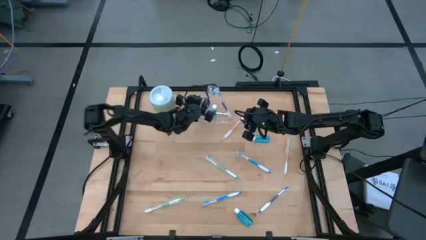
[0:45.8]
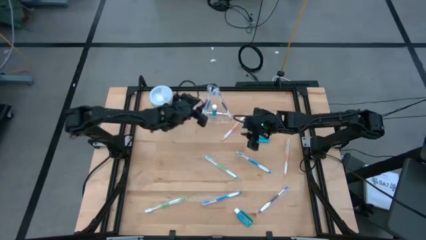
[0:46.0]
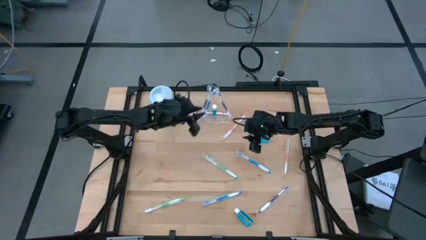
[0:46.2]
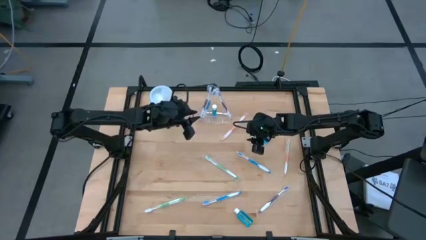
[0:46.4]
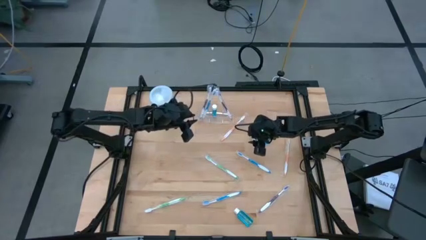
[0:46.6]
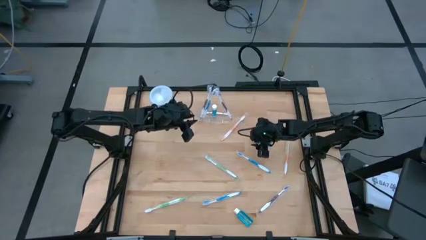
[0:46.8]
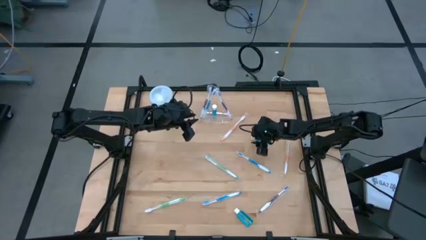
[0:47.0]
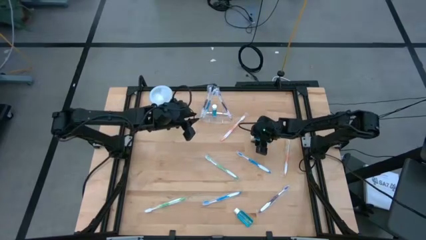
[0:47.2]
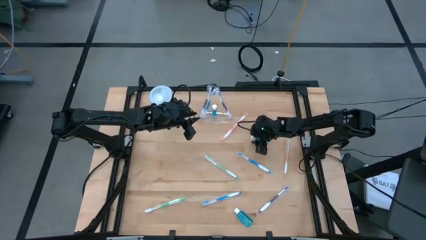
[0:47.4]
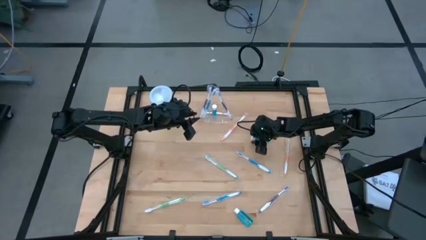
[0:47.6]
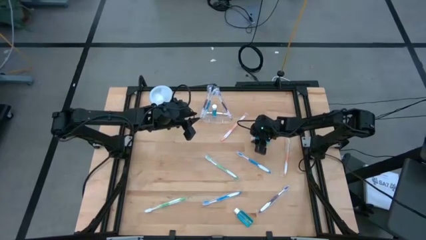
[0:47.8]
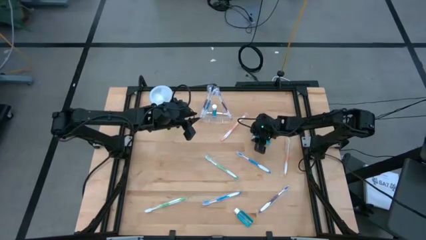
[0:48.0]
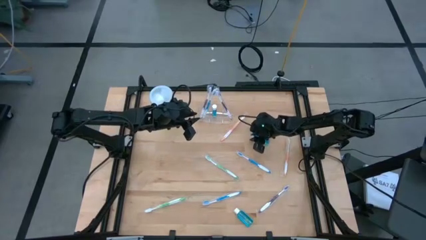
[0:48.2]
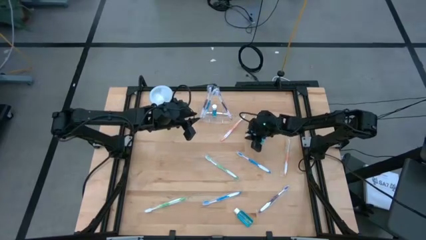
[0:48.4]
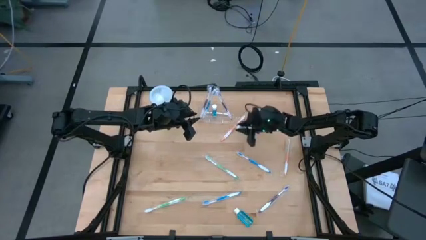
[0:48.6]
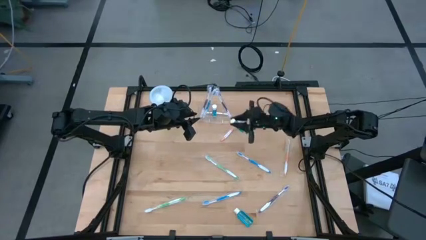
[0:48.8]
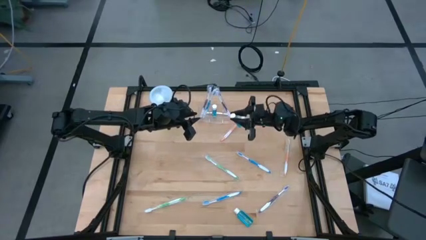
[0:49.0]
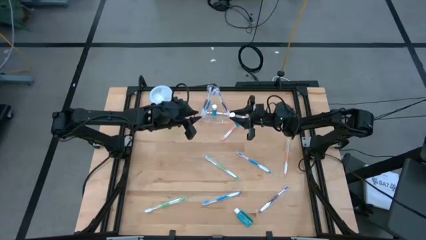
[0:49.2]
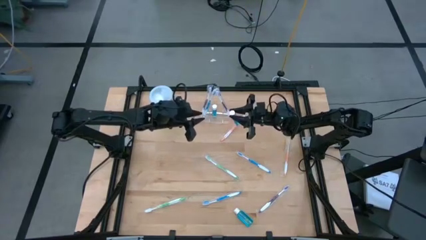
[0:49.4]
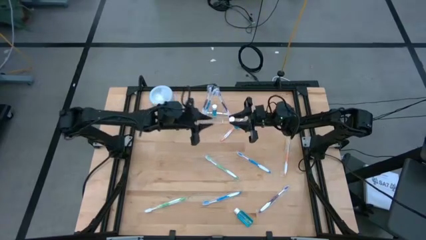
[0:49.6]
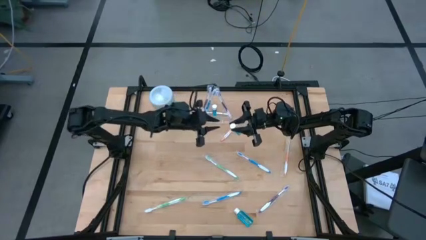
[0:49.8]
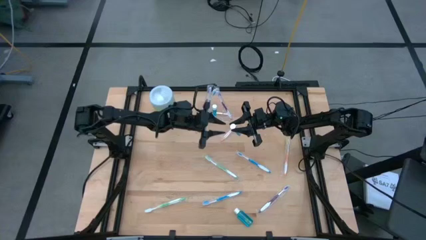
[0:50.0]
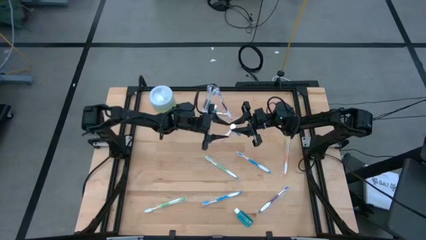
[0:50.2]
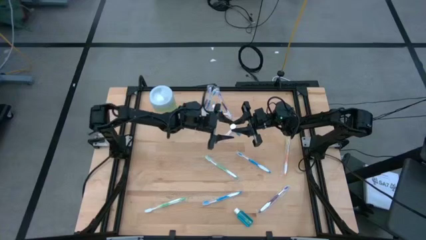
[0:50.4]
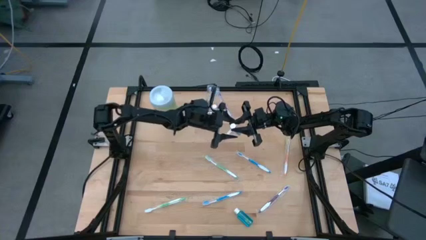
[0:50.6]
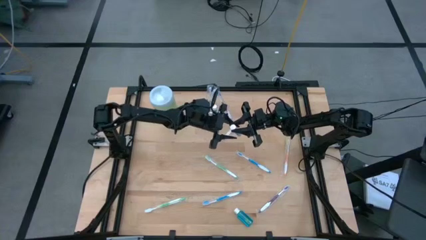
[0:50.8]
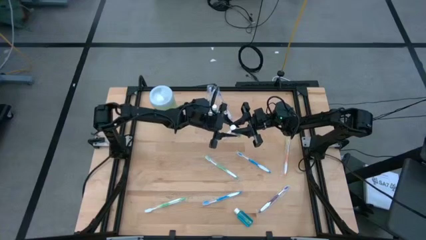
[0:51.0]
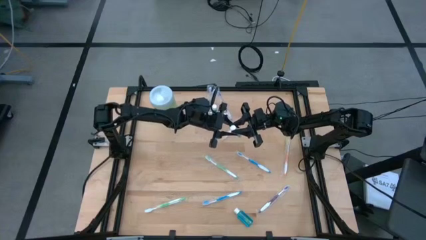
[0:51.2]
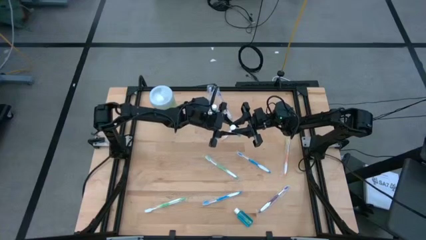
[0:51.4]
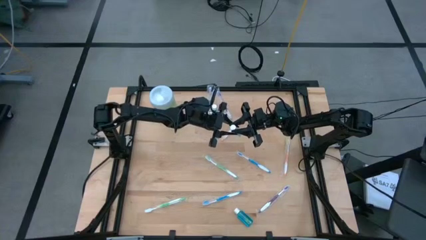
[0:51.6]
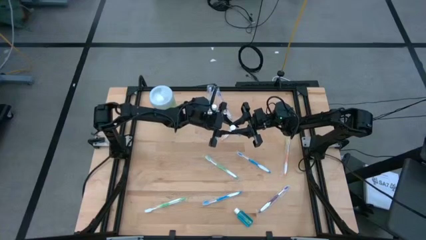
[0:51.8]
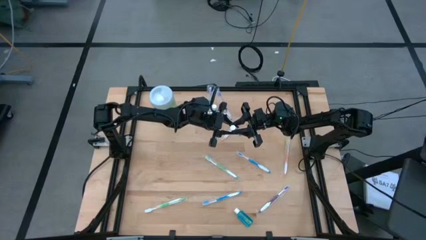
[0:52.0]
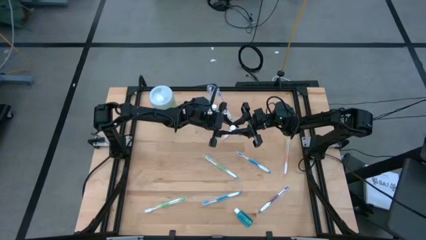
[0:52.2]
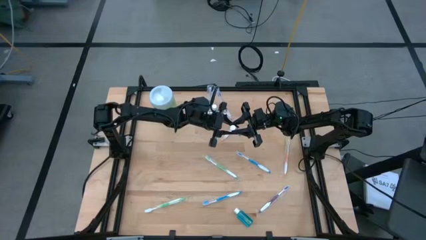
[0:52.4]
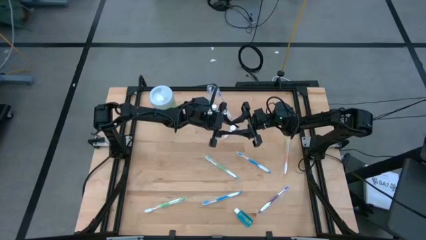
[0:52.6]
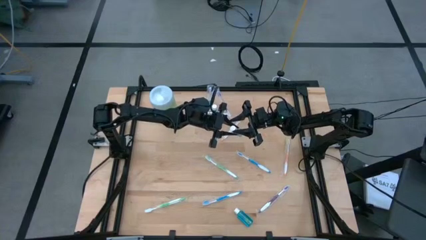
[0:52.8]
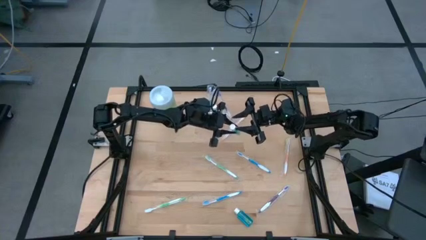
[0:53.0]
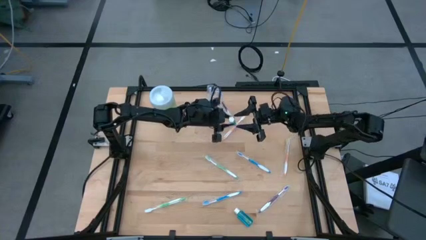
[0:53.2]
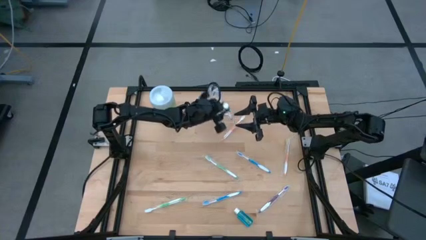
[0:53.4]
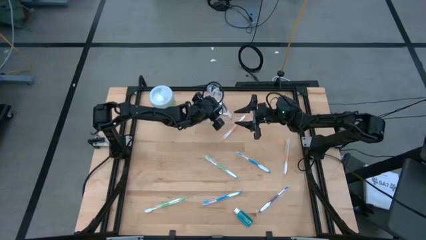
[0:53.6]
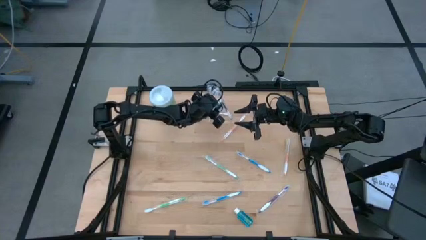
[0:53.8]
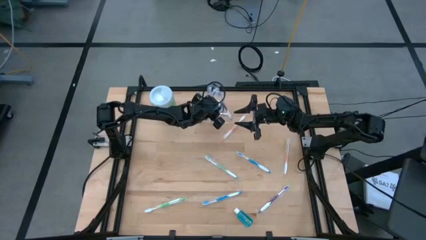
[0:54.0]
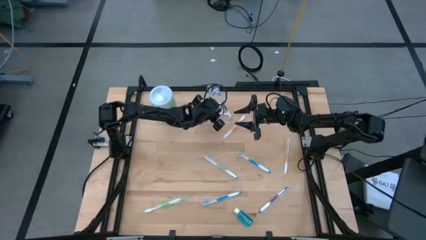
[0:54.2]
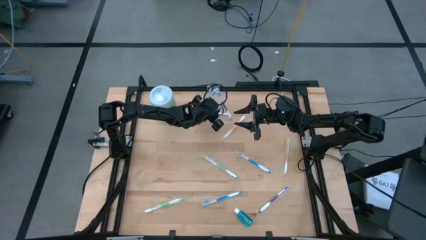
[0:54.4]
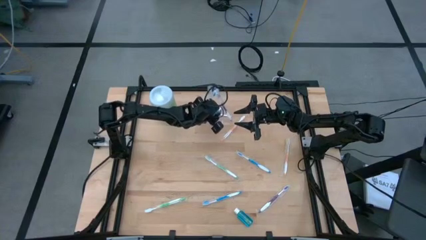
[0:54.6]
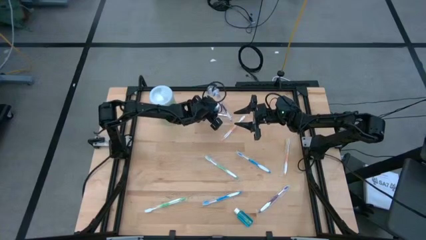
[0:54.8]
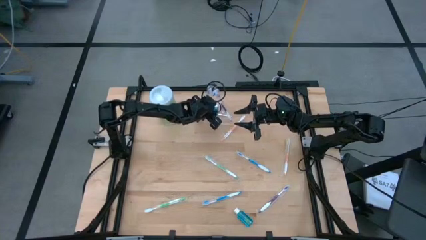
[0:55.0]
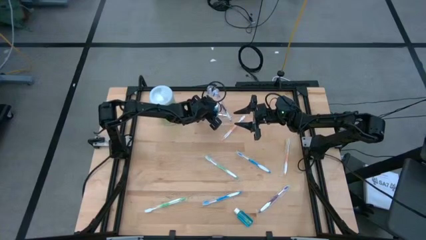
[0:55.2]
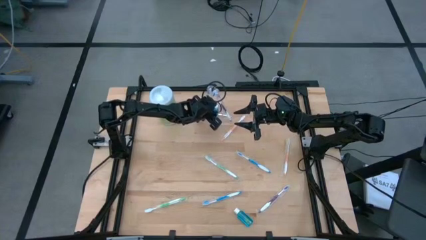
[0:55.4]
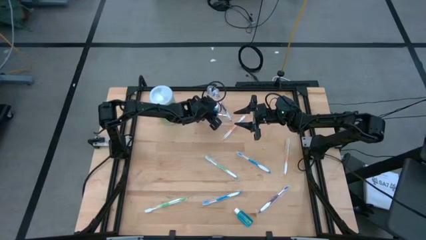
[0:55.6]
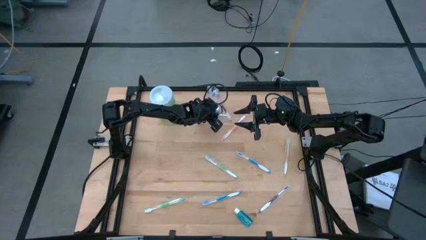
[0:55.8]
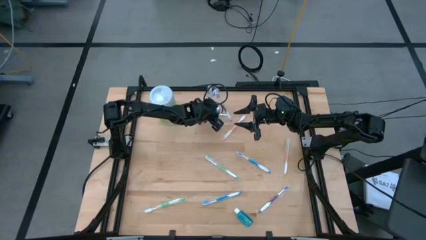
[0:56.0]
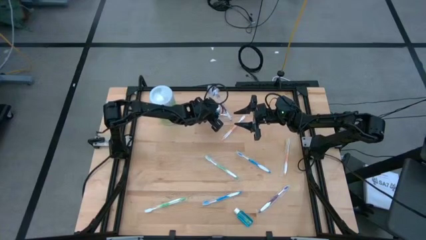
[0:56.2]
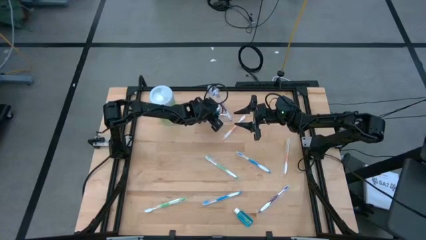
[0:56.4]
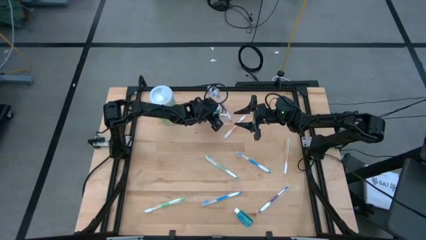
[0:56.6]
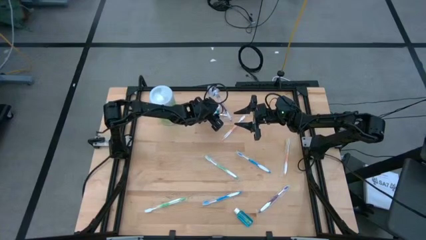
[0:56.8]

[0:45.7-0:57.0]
Task: Pick & Place toothbrushing station
Put the top mouthwash into the transparent organizer

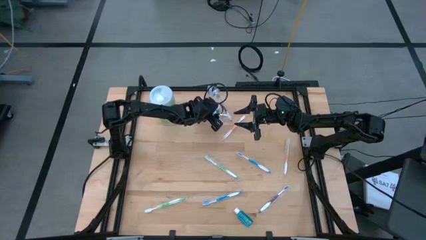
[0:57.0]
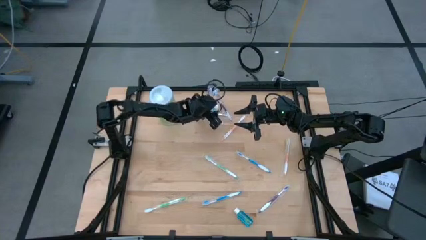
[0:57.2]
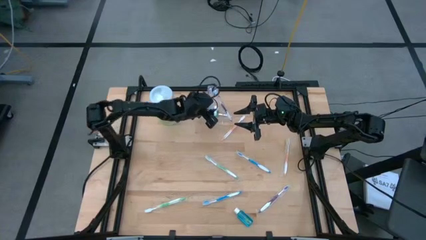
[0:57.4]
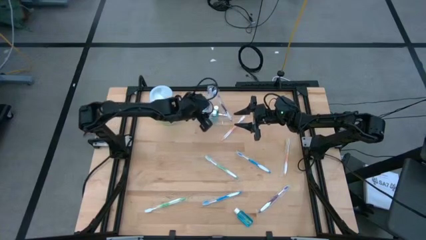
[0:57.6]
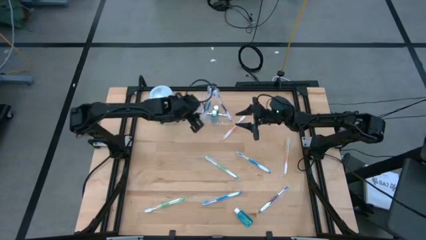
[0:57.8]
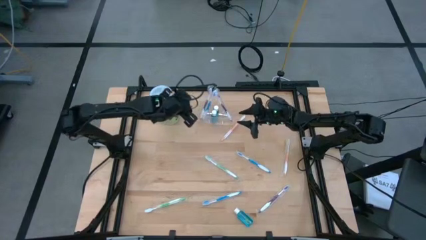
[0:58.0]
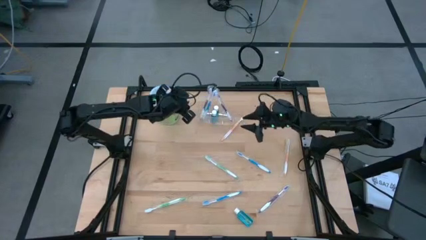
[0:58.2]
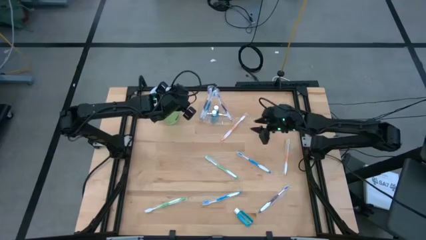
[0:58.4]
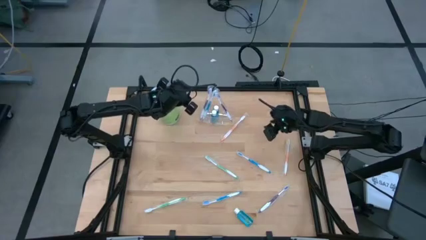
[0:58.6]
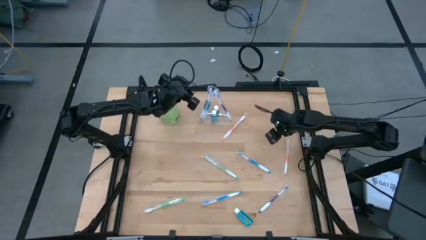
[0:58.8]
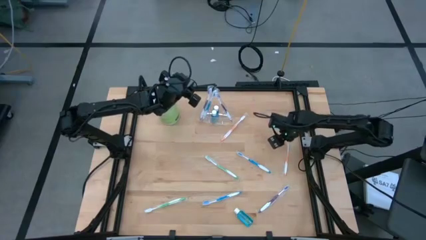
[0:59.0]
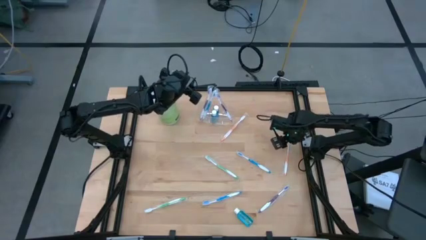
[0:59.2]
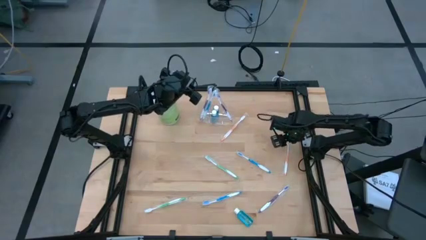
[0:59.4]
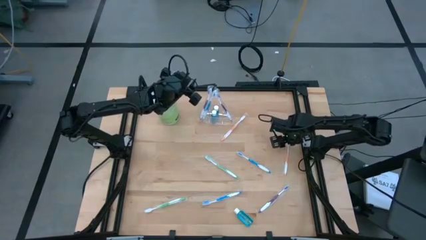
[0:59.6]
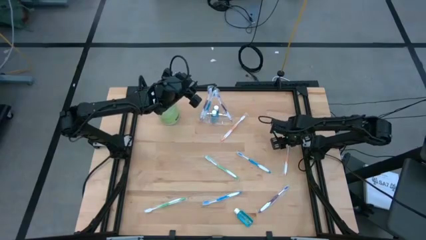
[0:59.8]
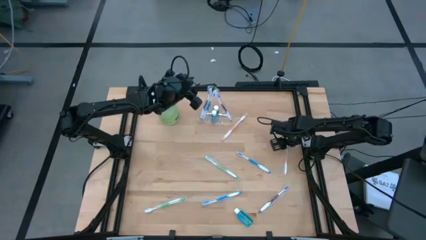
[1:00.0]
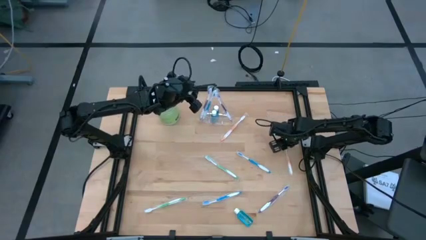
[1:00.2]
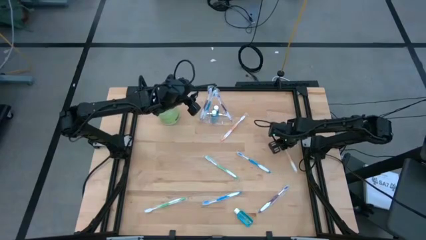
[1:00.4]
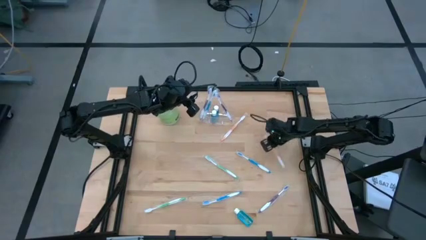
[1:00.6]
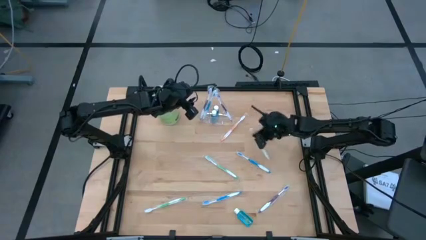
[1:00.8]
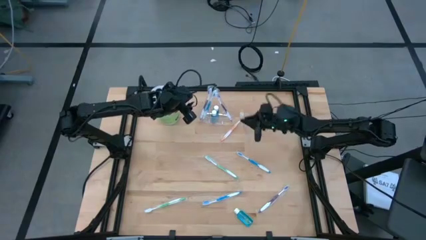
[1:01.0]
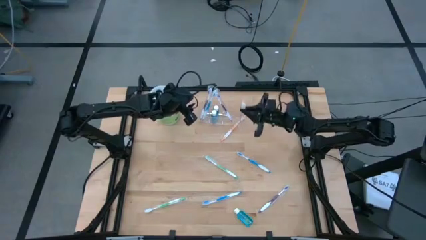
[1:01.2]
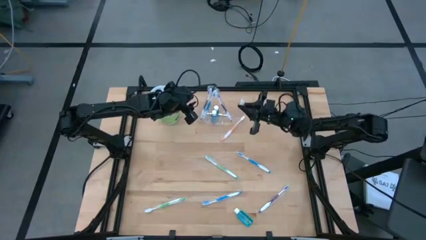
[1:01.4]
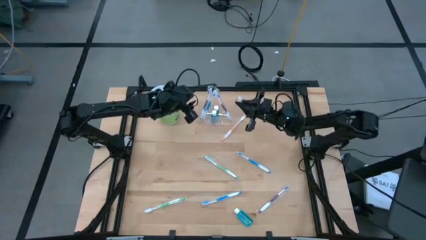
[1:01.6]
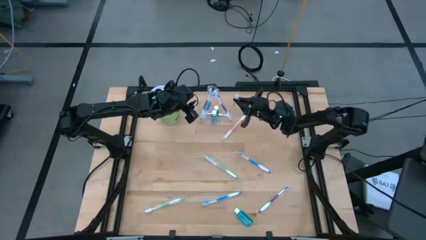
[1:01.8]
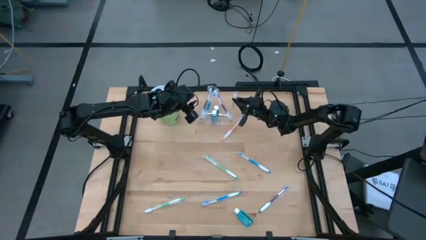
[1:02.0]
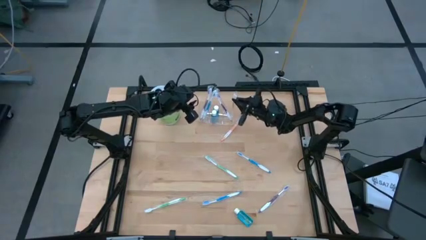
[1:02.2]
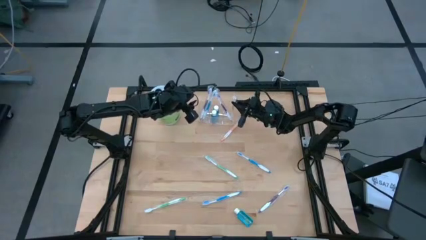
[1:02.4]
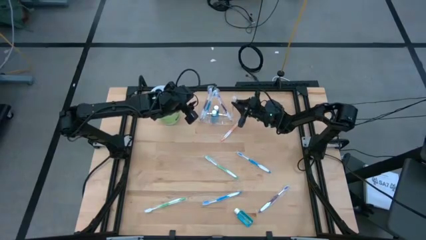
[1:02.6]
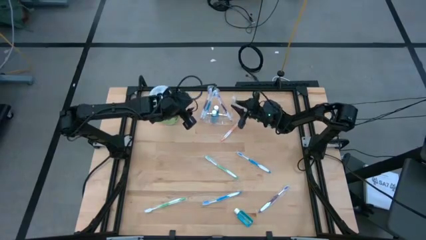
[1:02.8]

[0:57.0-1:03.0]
Put the left orange toothbrush into the transparent organizer
